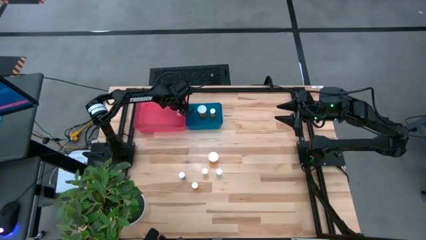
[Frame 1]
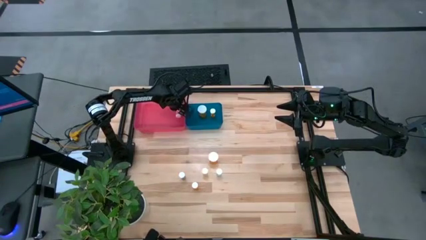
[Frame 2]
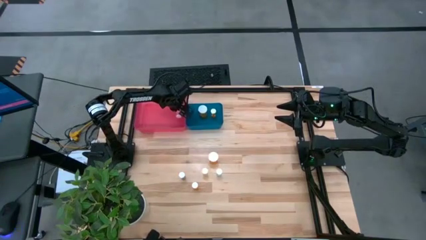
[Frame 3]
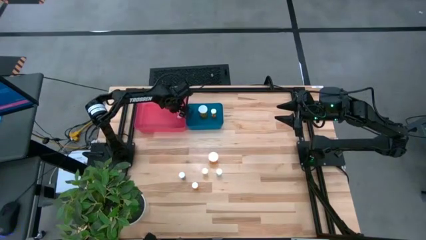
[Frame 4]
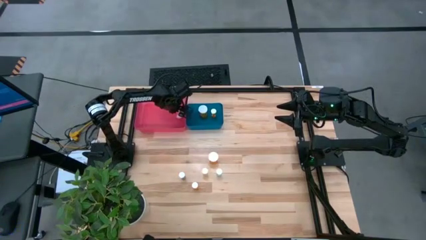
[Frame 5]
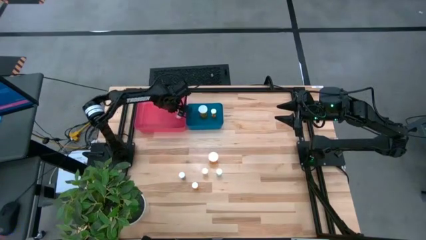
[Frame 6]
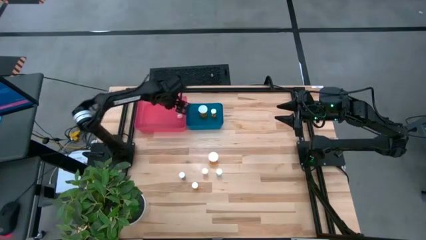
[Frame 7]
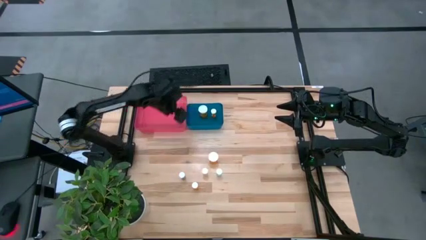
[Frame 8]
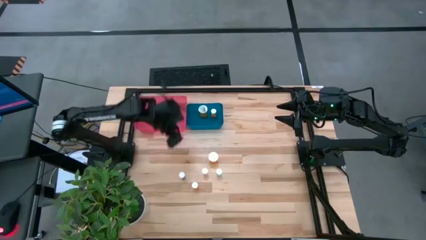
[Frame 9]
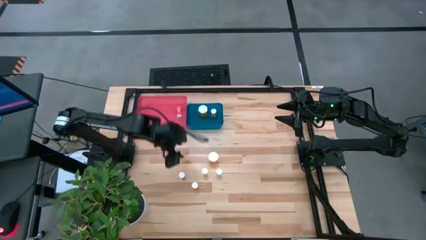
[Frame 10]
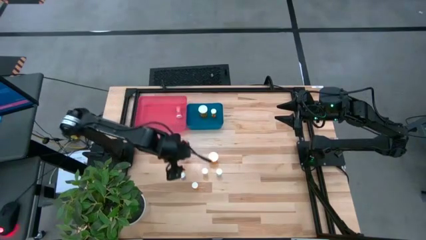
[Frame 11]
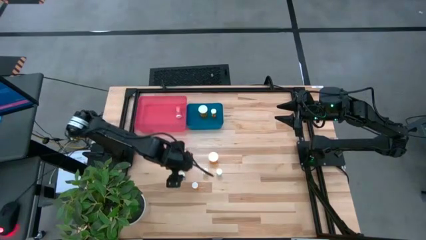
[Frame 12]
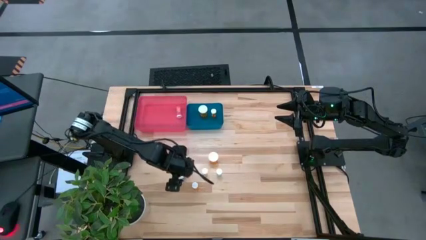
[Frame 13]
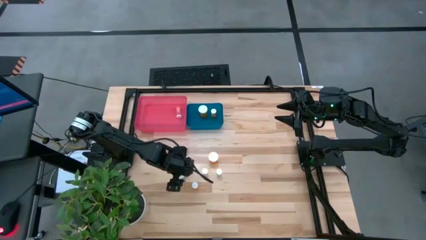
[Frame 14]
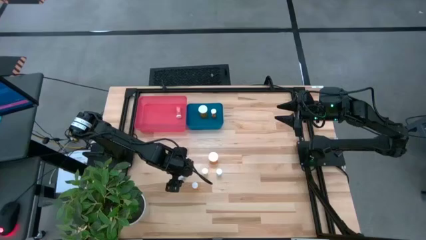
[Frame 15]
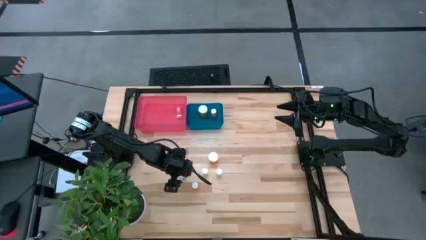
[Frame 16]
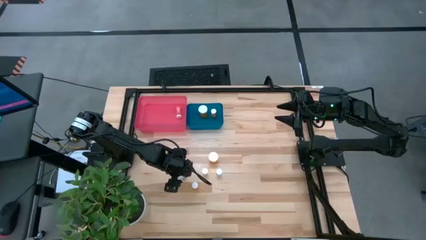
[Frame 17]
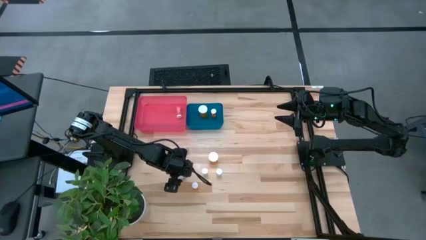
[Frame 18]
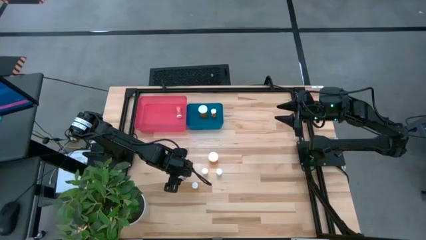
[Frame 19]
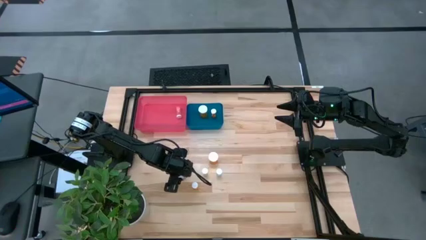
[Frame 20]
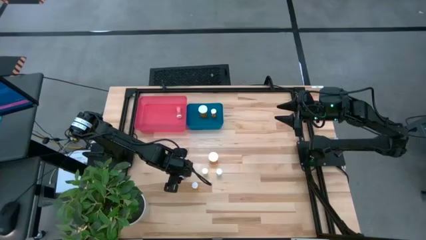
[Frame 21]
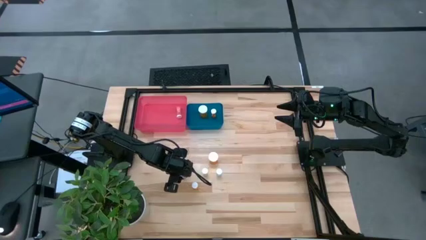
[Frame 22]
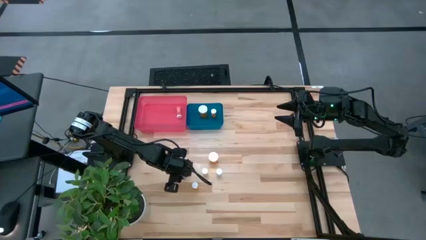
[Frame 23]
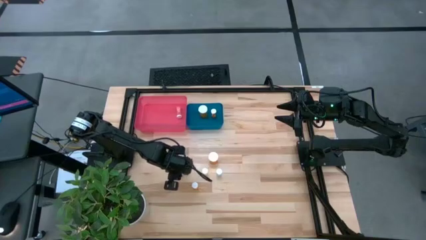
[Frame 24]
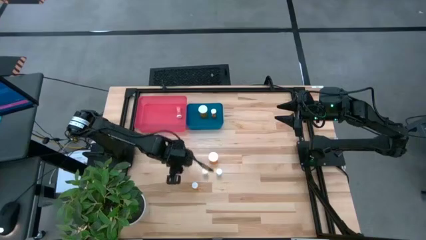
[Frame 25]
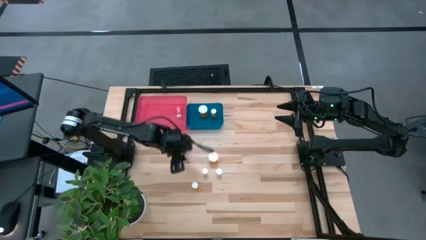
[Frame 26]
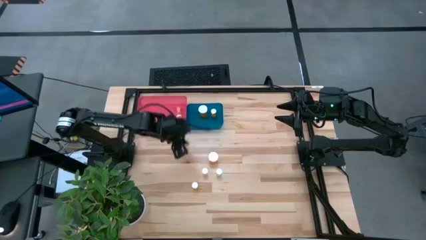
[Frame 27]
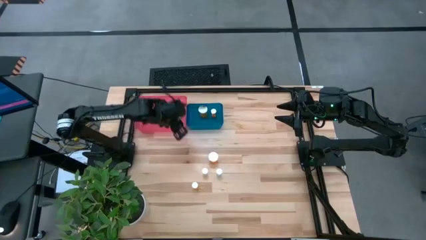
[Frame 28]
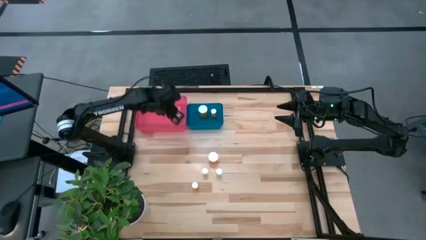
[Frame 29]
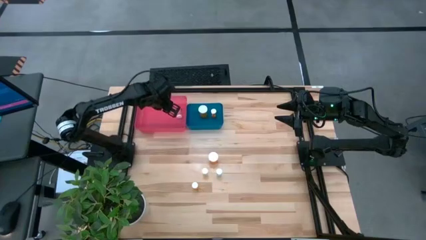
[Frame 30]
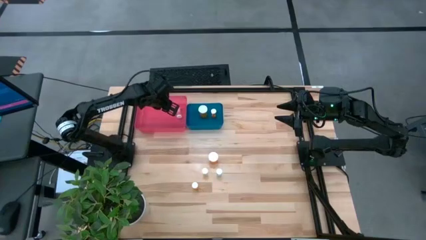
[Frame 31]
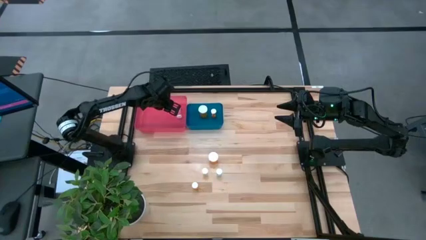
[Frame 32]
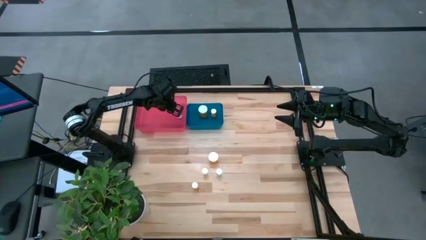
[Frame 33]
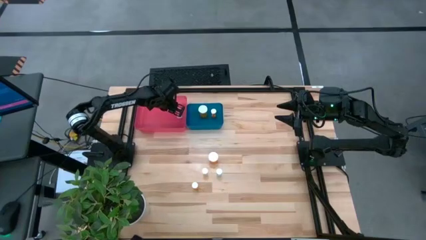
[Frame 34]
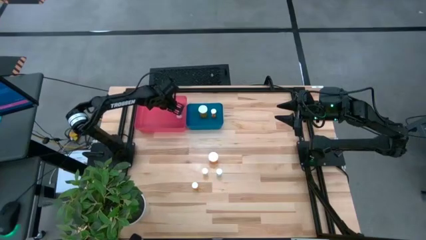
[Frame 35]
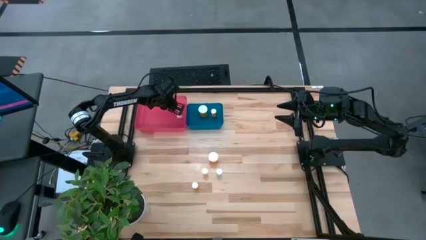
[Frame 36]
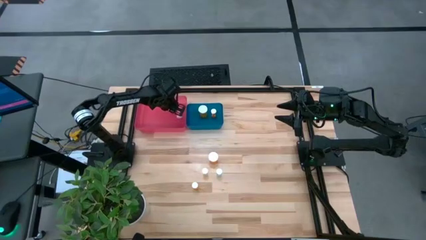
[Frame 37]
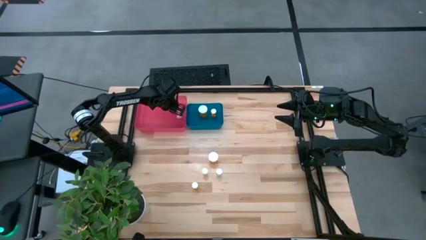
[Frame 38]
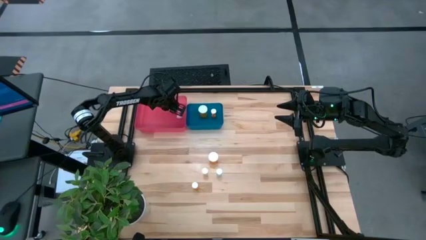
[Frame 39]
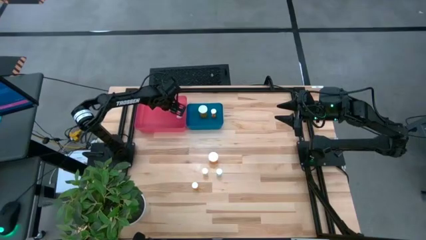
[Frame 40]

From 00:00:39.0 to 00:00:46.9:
Task: Pick and place medicine bottles into bin by pill shape (circle, oval)
Put the blue capsule bottle into the pink bin

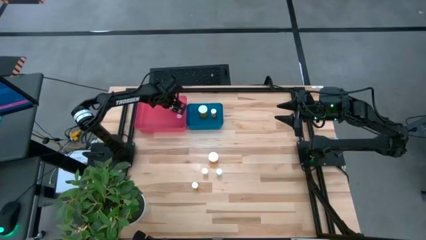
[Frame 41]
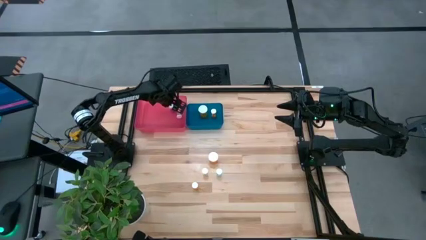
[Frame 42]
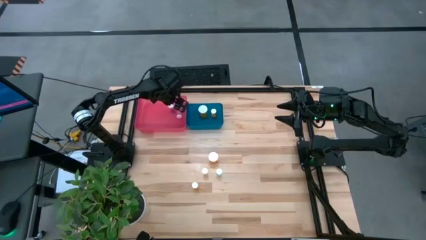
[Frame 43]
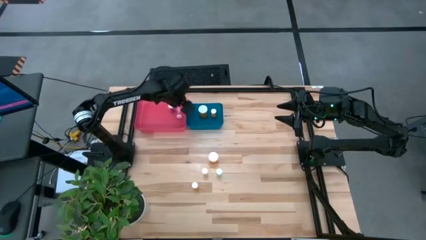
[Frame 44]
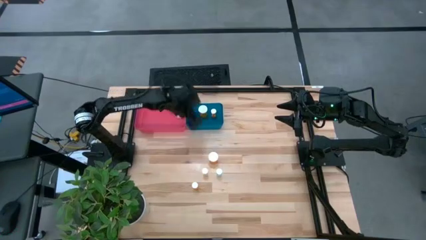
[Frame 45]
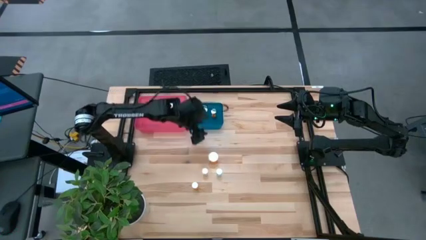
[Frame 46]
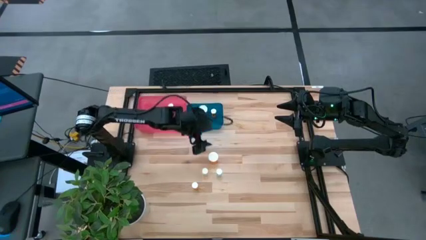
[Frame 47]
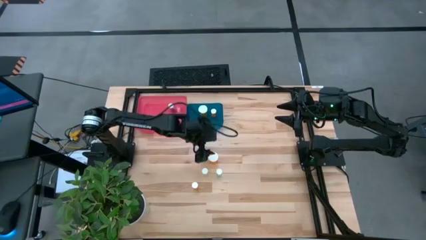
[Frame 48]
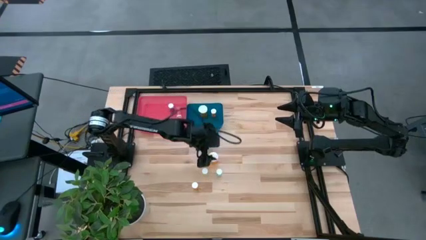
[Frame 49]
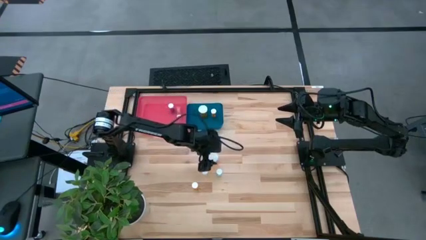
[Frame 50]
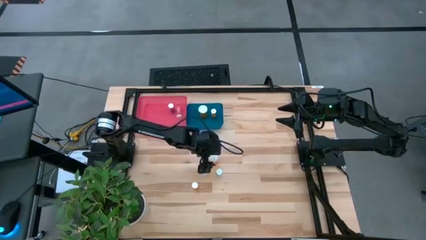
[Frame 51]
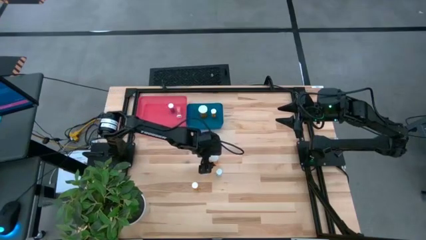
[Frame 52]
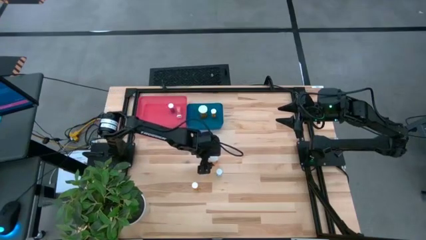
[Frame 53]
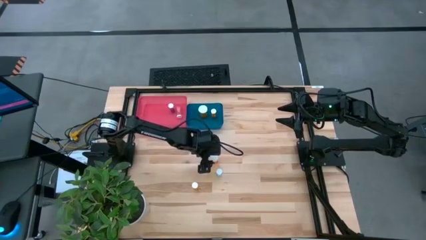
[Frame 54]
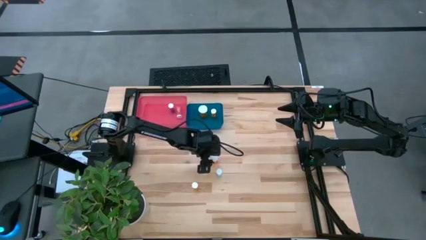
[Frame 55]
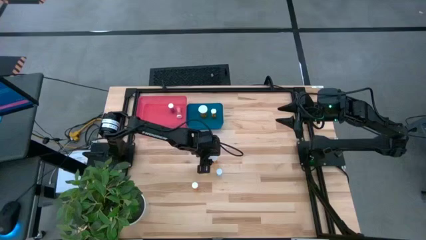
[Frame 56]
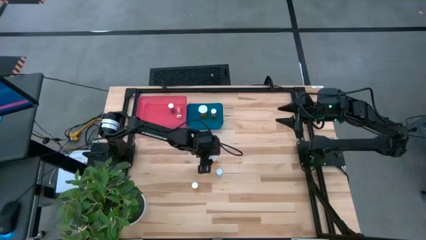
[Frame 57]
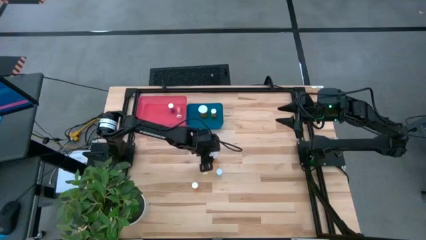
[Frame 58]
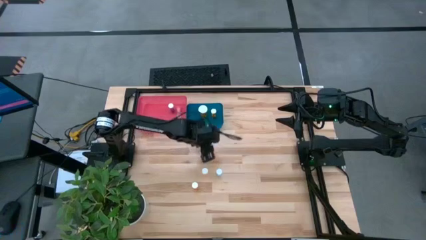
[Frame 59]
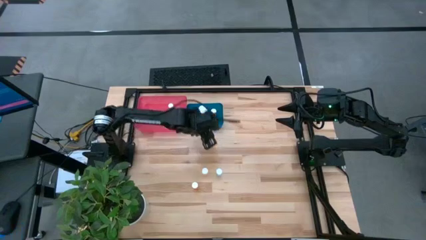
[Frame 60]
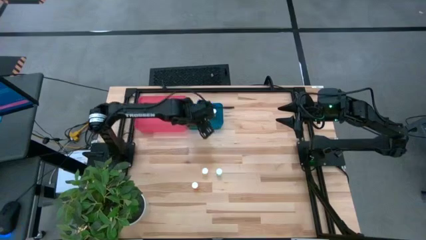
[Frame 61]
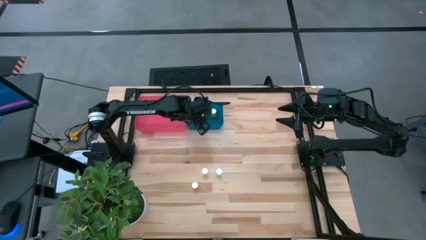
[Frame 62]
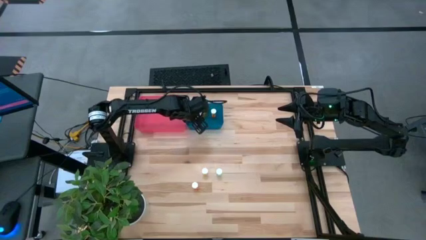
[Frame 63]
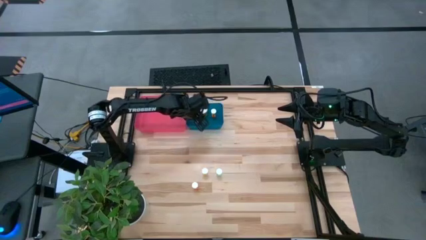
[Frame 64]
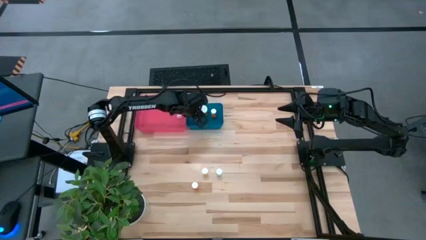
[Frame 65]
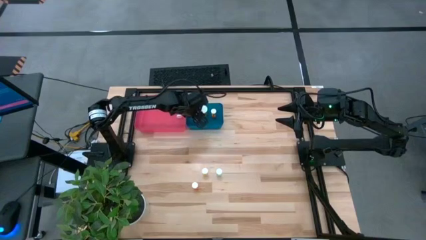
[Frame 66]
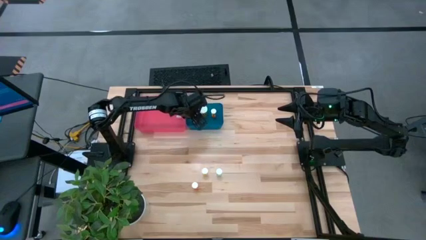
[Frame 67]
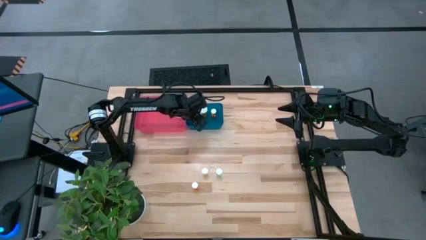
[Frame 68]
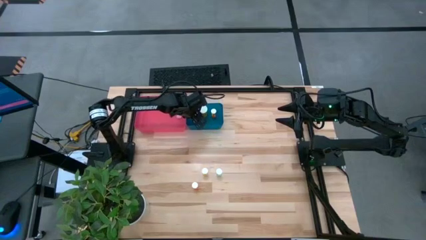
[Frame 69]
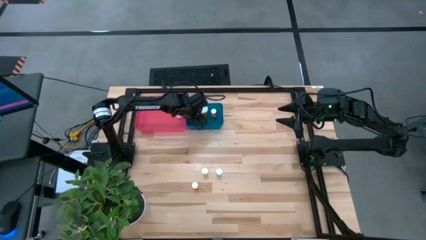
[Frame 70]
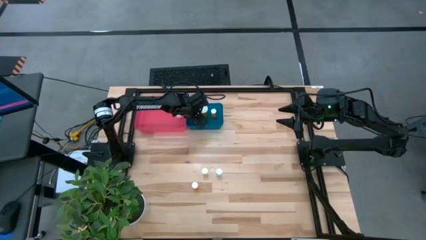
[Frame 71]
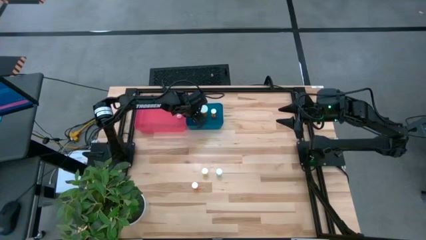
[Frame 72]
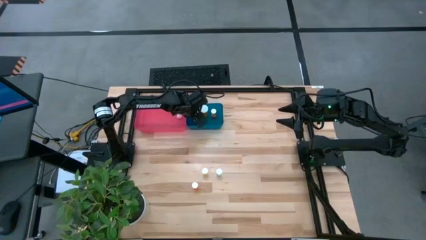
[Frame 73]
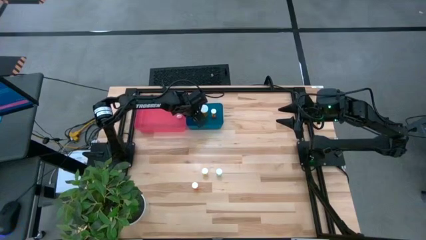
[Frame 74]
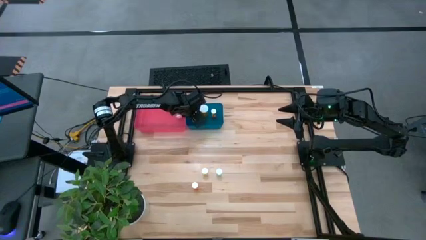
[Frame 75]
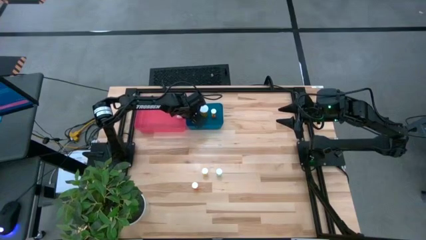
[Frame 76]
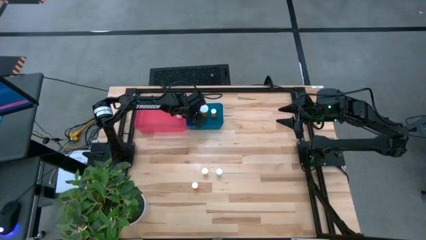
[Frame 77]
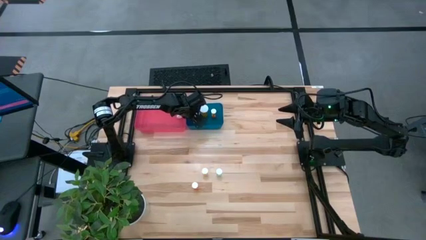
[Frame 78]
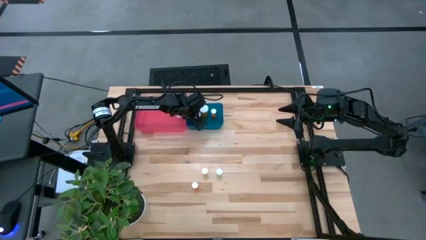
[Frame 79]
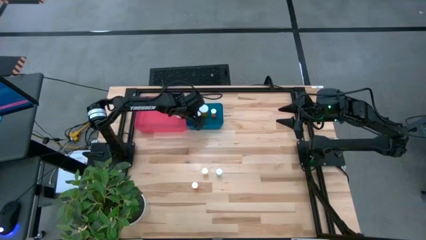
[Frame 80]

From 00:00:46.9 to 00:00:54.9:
Put the orange capsule bottle into the blue bin
